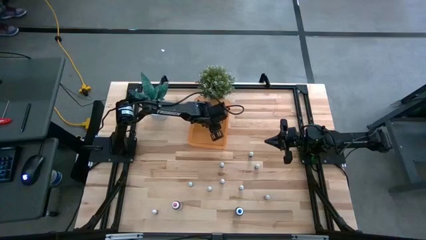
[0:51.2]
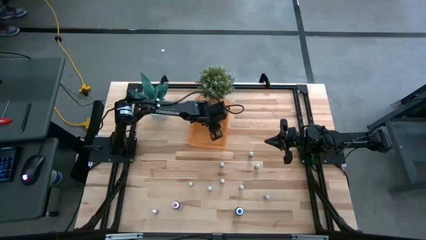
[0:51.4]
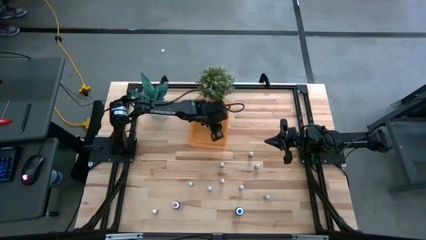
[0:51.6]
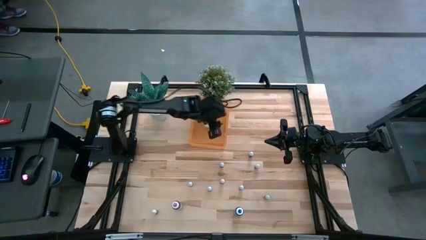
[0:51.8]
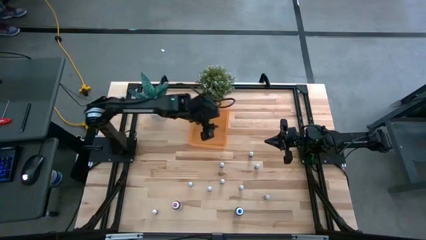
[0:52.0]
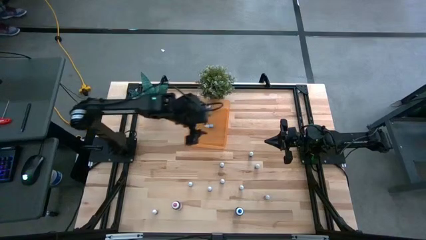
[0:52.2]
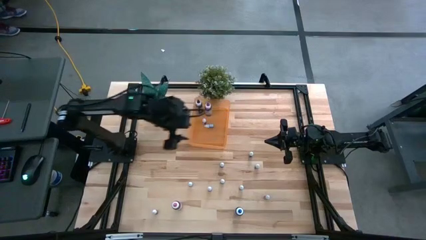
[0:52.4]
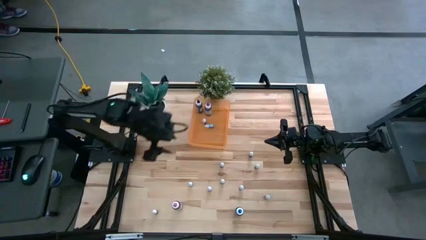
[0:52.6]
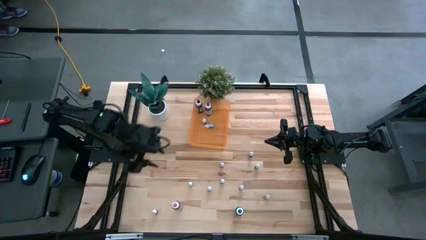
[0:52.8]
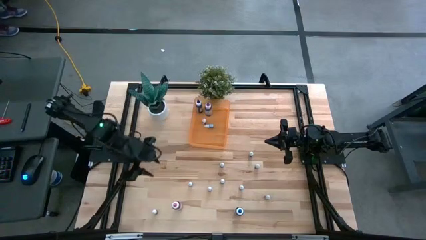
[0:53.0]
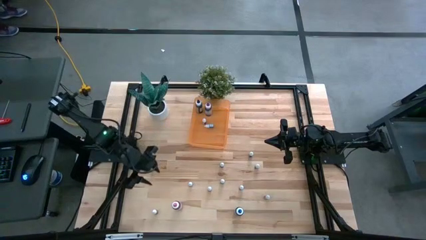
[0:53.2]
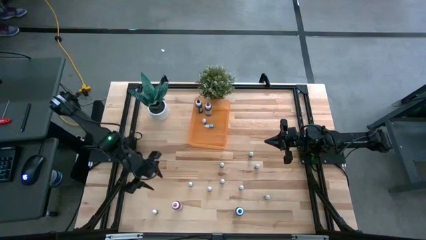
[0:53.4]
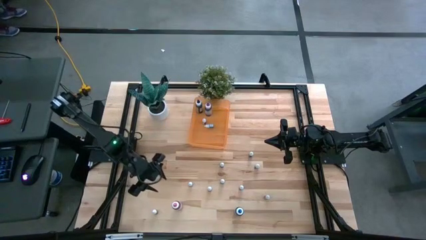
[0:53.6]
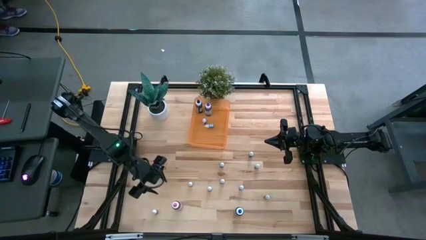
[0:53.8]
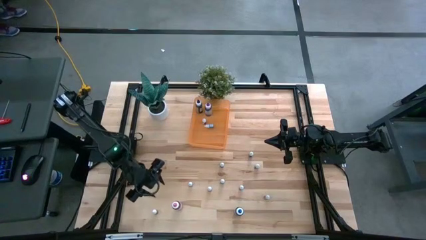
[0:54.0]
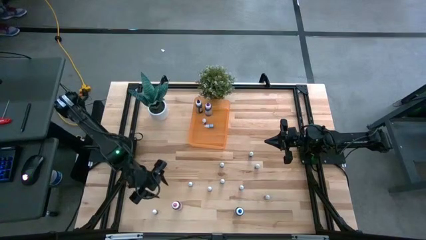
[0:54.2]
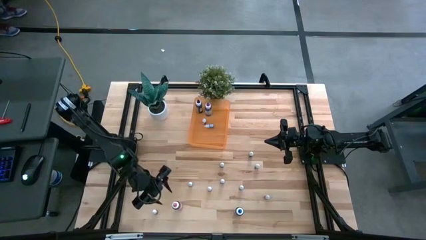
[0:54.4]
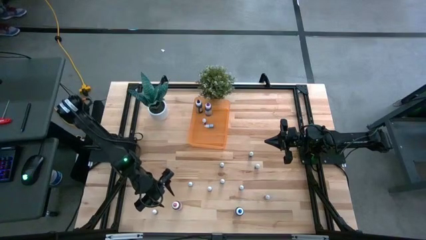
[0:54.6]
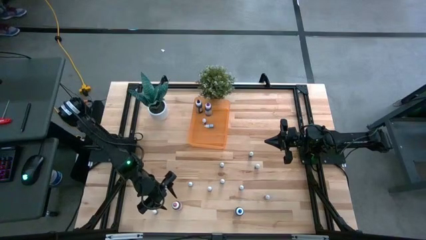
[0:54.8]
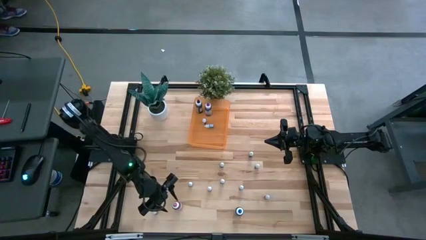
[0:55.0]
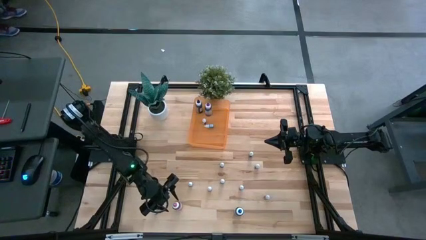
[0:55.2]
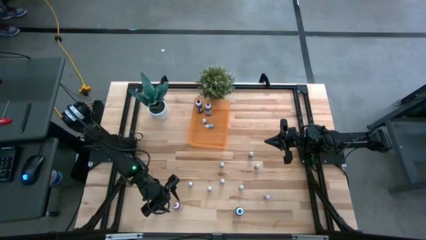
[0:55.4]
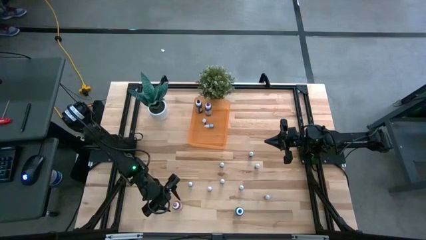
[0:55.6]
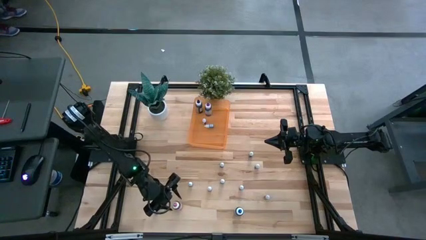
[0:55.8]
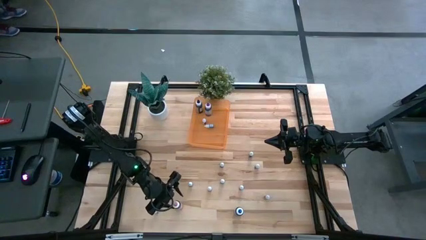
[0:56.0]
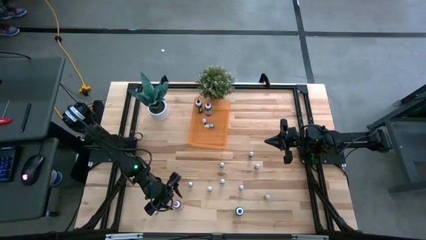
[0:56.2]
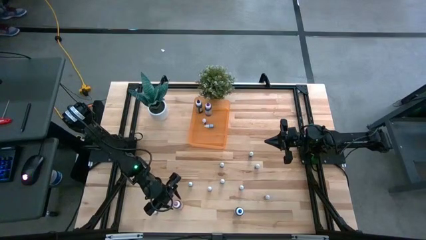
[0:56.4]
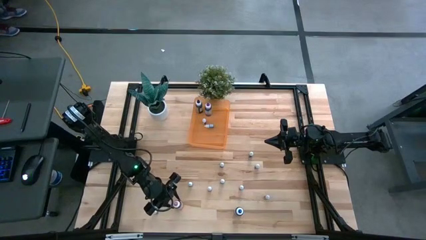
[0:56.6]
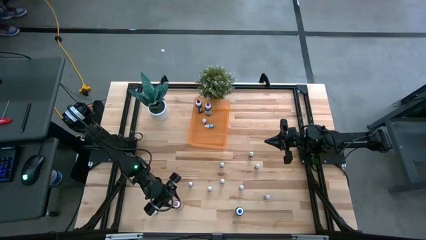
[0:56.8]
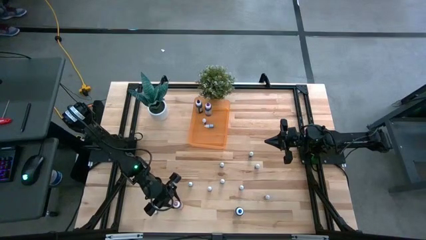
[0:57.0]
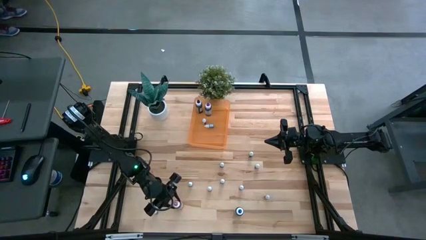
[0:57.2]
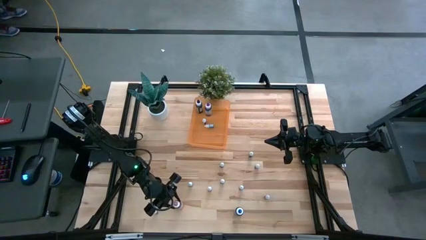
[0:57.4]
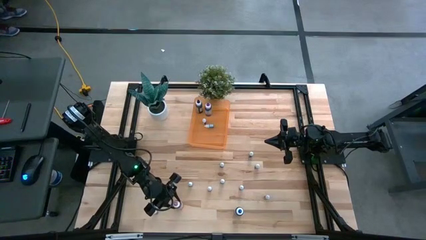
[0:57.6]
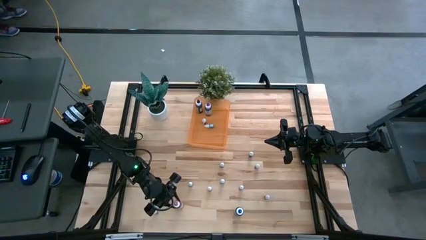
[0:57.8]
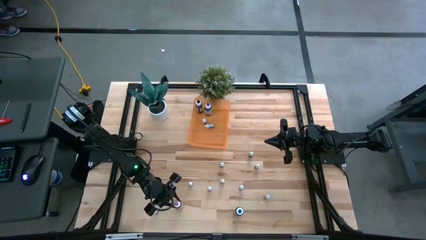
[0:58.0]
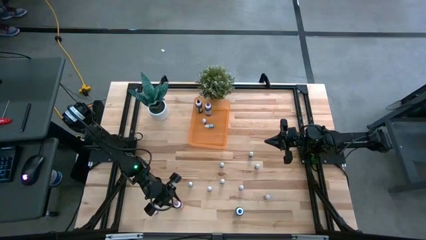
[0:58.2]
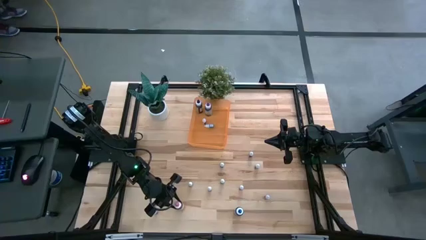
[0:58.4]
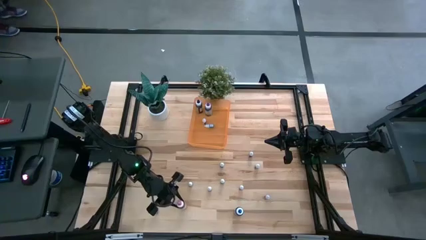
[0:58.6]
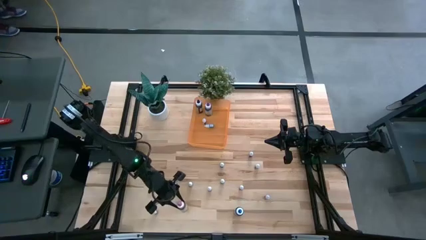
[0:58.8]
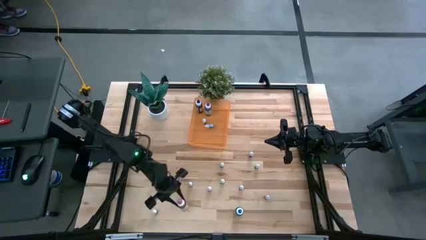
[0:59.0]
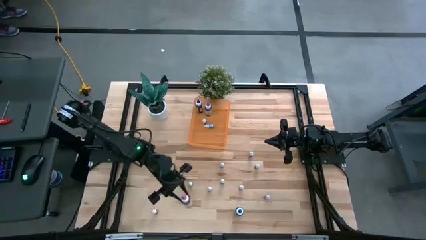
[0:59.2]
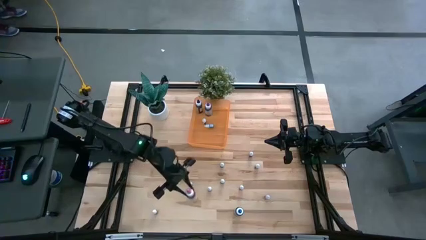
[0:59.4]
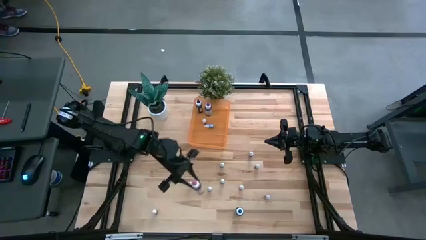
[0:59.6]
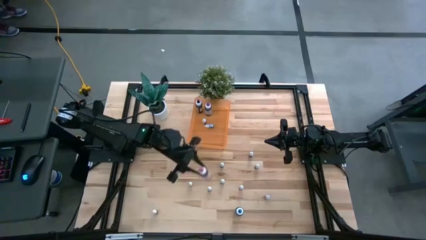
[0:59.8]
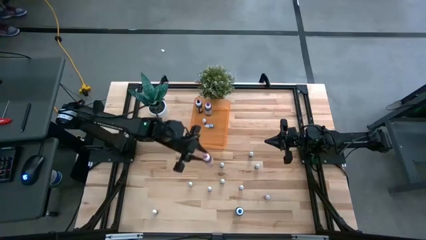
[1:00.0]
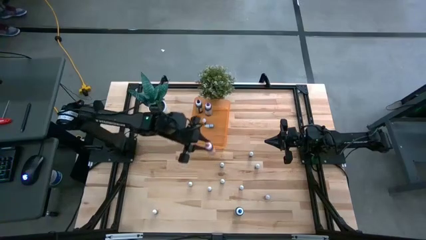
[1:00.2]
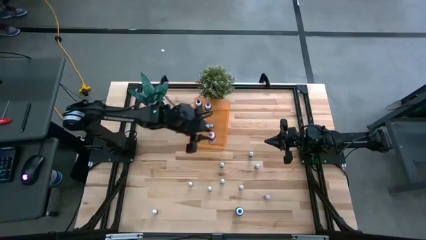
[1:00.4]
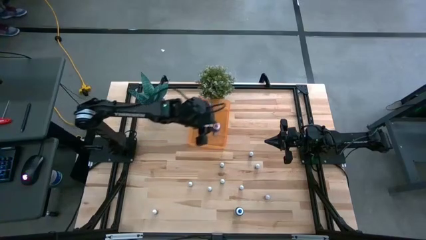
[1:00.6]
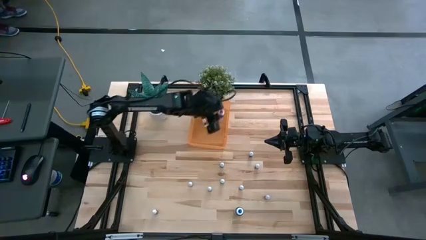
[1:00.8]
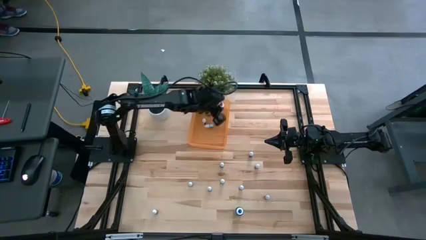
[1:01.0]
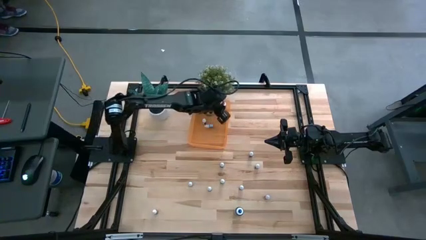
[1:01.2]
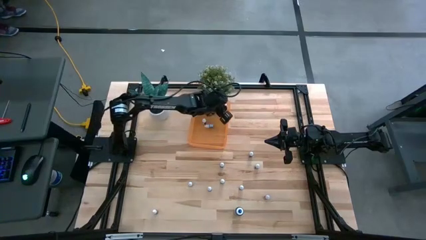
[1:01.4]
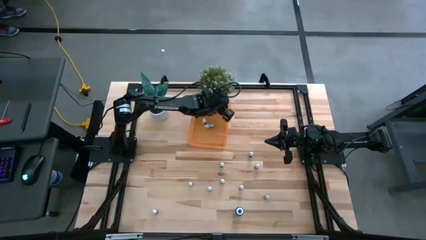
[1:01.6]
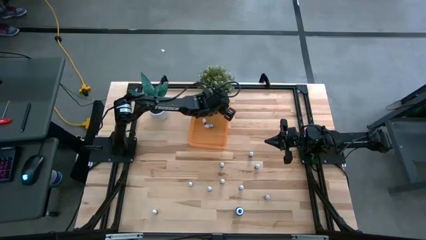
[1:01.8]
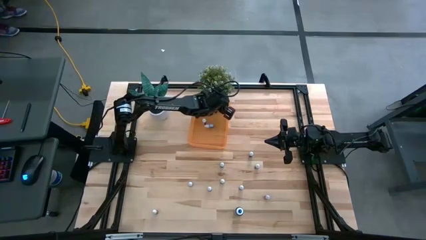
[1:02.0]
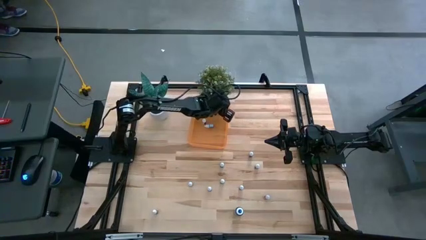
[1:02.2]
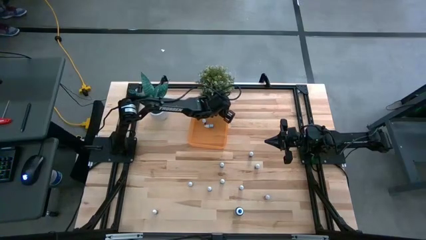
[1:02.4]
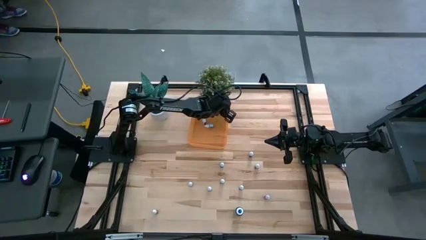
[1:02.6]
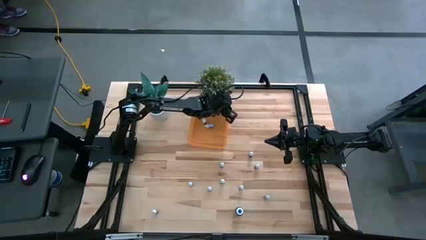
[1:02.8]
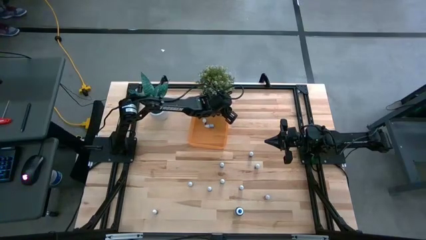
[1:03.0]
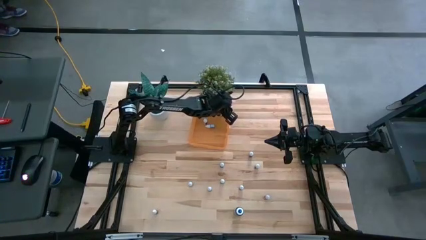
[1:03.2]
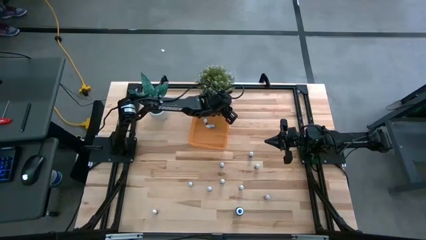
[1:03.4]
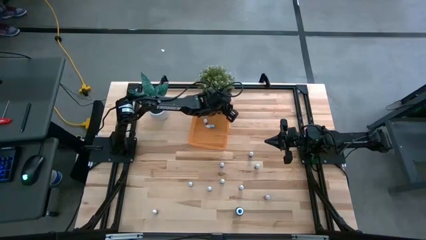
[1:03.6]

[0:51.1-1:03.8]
Task: Pick & Place food coloring
Put the large pink food coloring bottle into the orange bin
